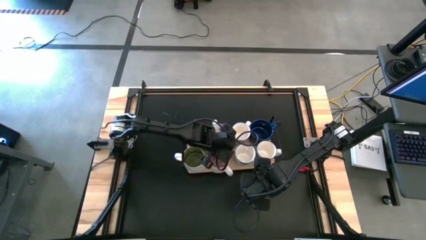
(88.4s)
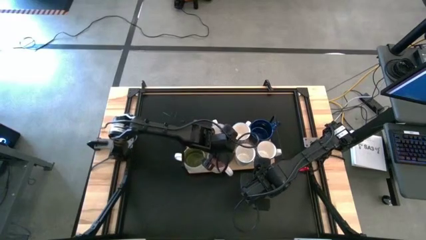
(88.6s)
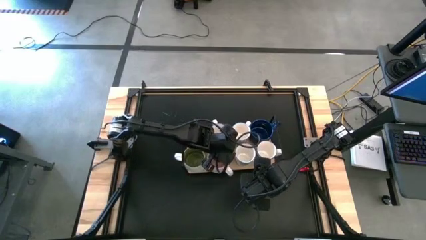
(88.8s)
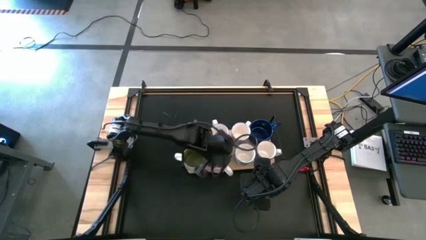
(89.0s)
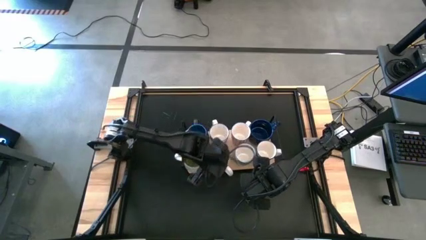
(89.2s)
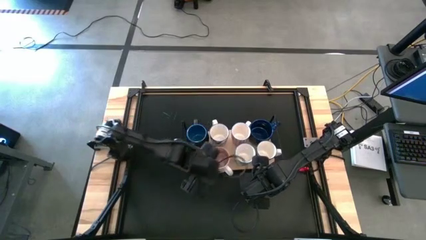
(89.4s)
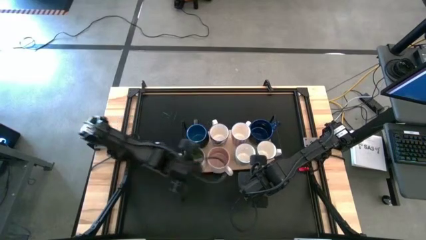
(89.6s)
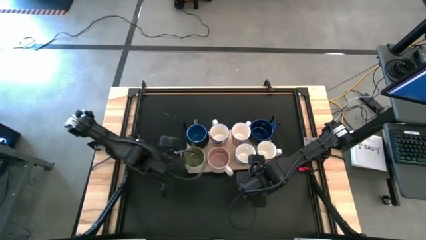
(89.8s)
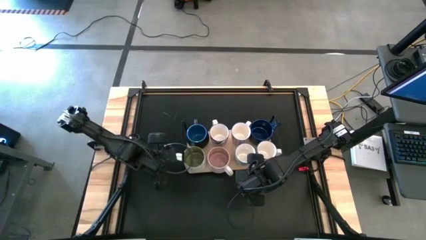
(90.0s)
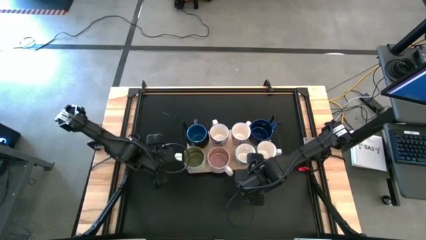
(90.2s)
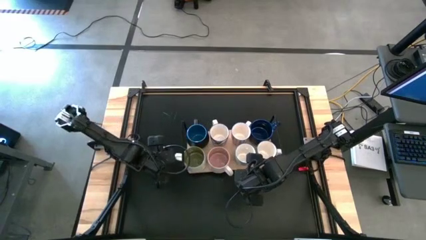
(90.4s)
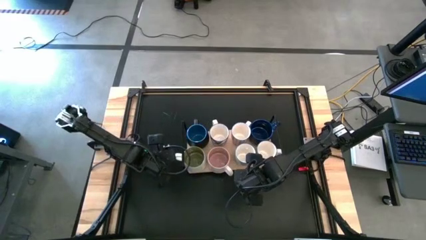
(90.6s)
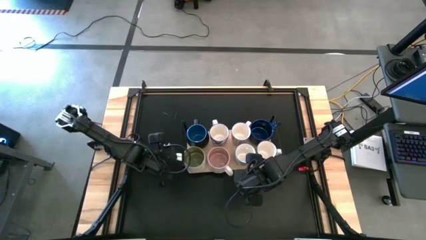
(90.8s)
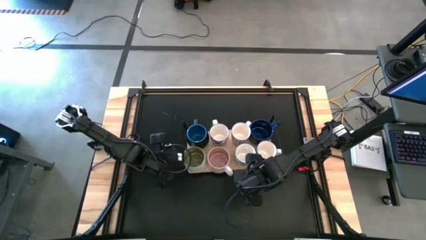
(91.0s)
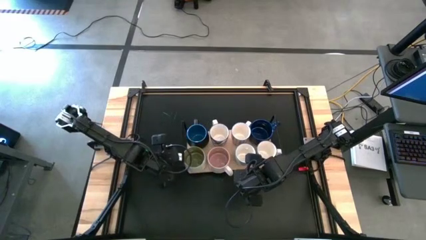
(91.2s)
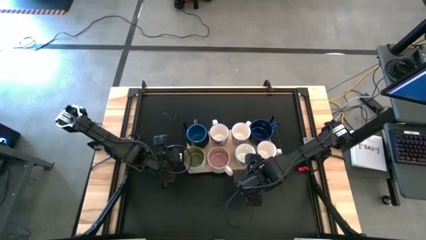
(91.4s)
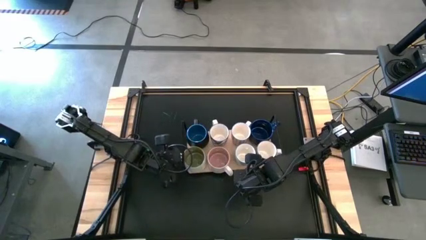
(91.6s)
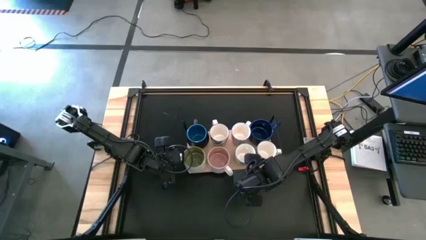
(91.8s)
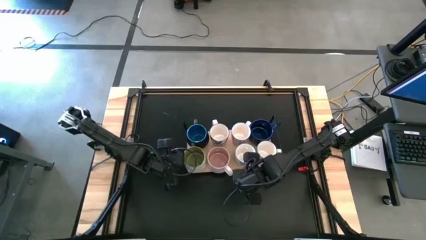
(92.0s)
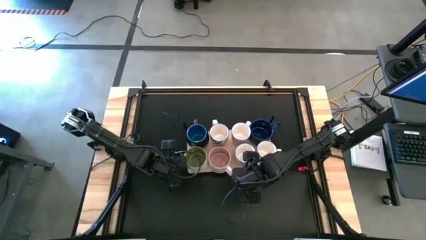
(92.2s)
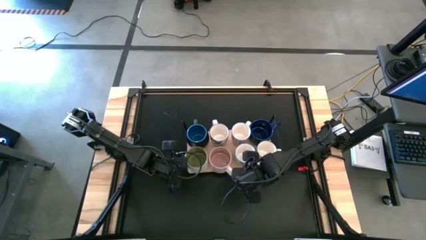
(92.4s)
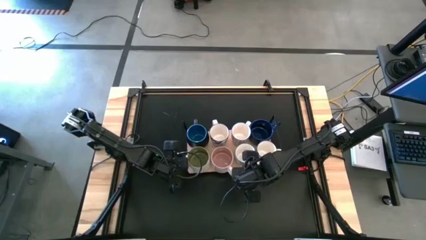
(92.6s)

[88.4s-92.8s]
Task: Place coffee mugs
Adjust the green mug on the shelf

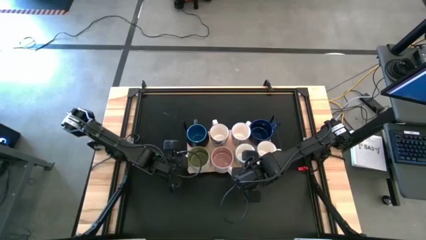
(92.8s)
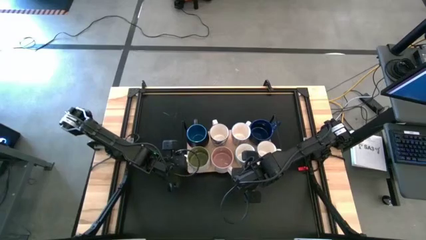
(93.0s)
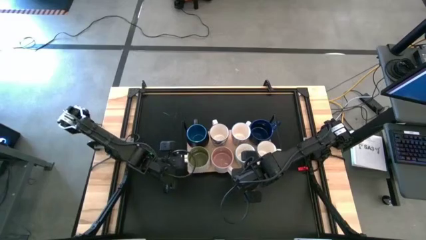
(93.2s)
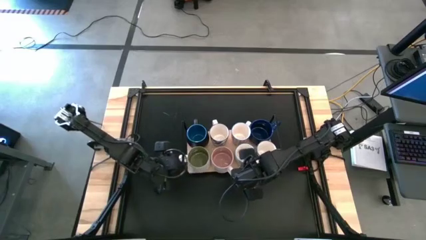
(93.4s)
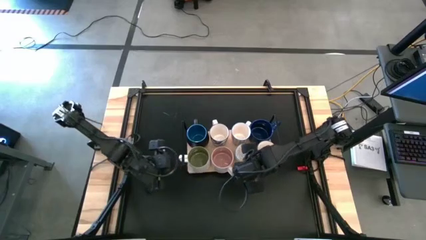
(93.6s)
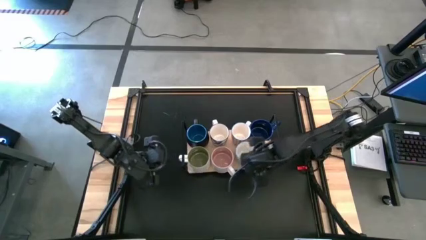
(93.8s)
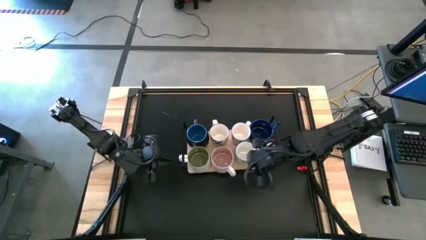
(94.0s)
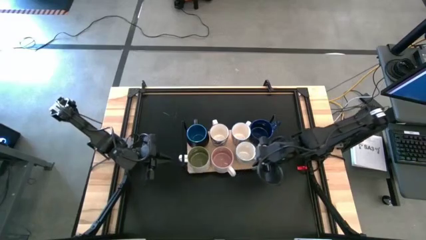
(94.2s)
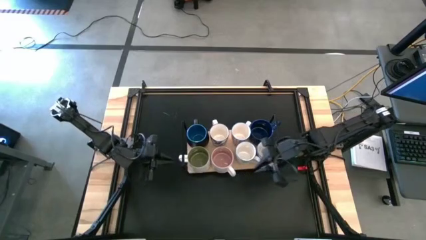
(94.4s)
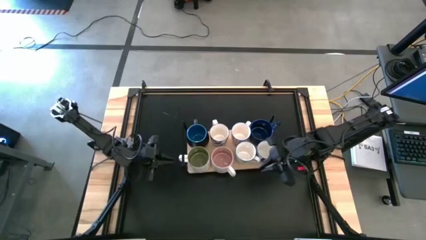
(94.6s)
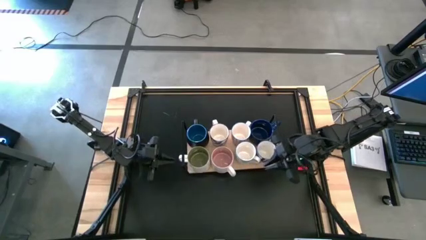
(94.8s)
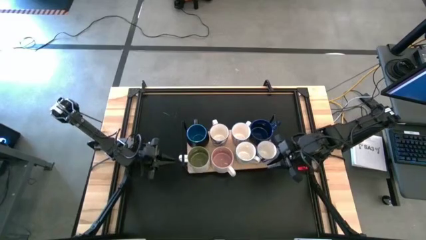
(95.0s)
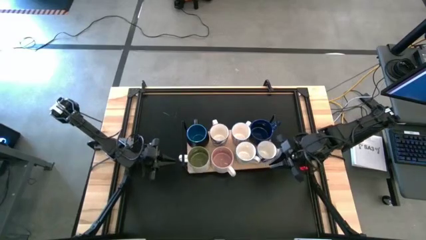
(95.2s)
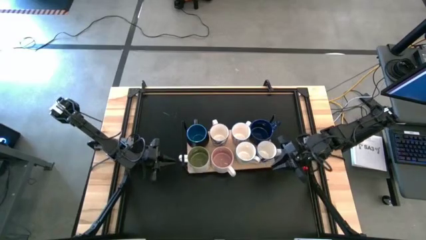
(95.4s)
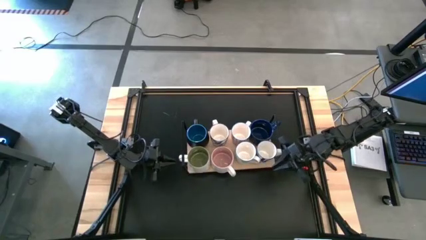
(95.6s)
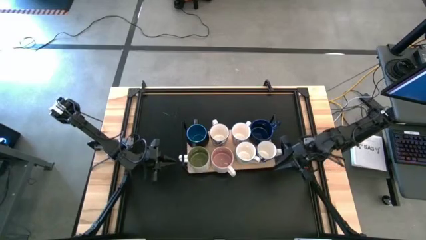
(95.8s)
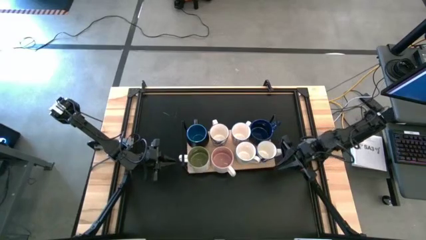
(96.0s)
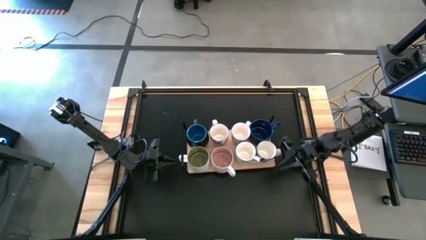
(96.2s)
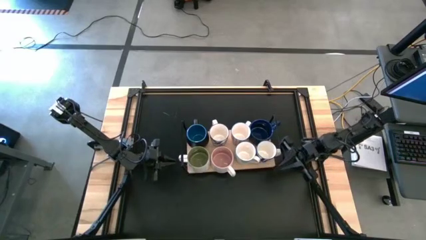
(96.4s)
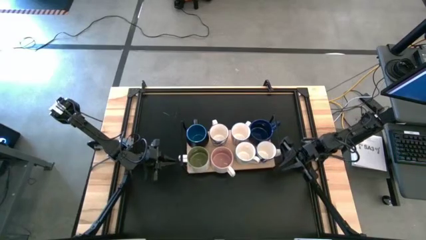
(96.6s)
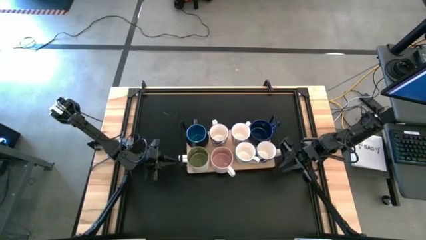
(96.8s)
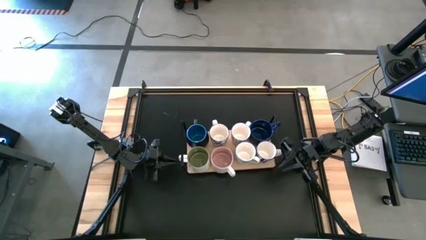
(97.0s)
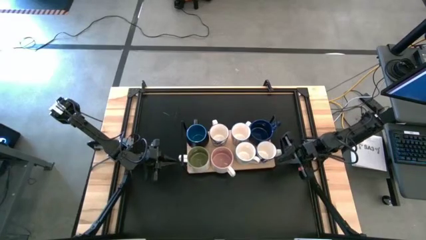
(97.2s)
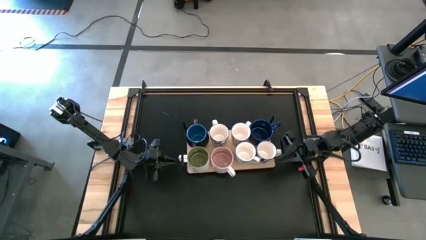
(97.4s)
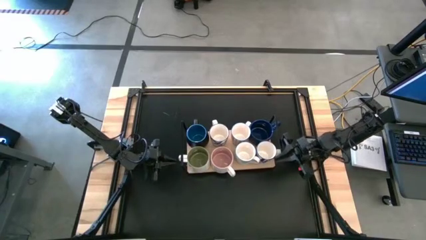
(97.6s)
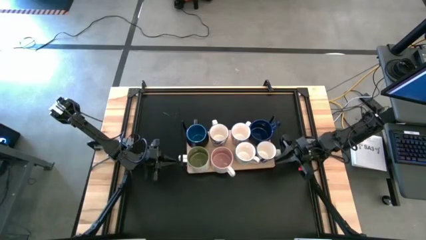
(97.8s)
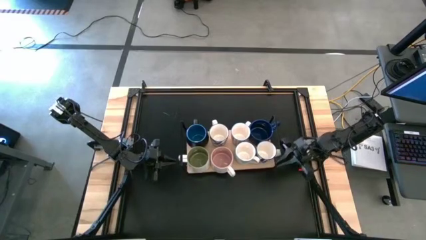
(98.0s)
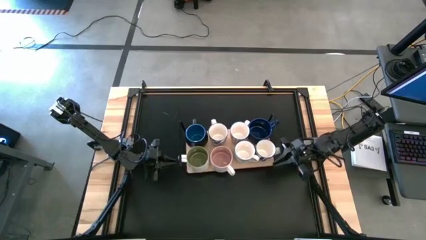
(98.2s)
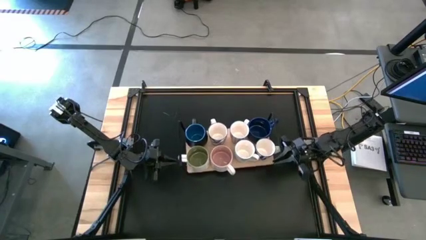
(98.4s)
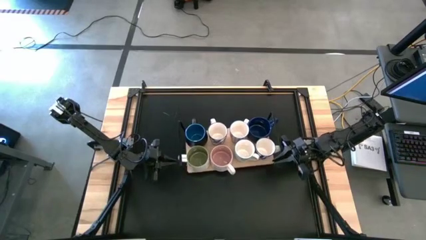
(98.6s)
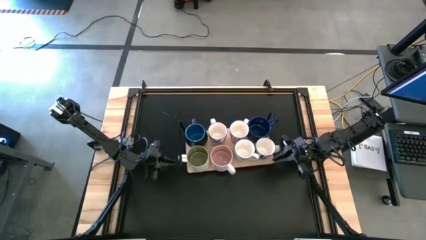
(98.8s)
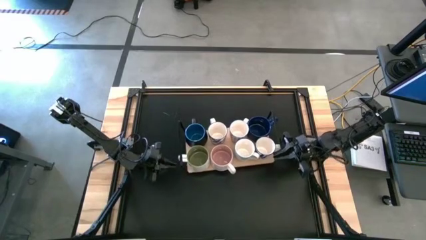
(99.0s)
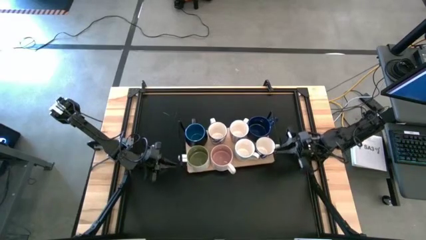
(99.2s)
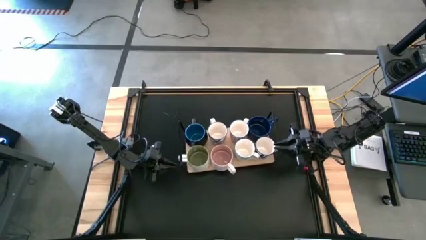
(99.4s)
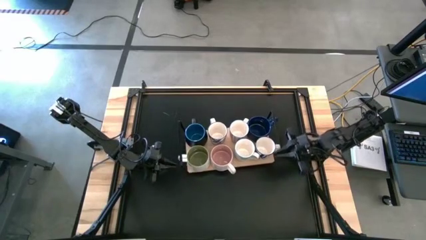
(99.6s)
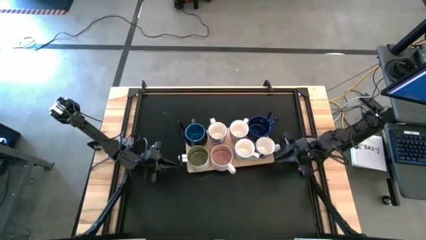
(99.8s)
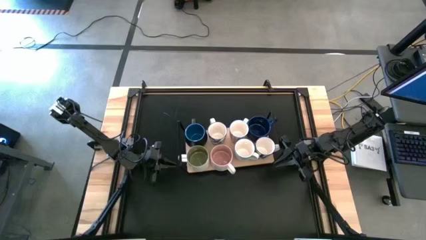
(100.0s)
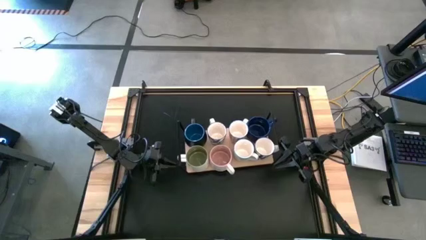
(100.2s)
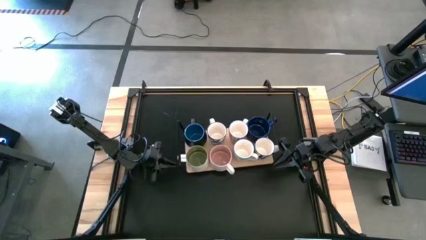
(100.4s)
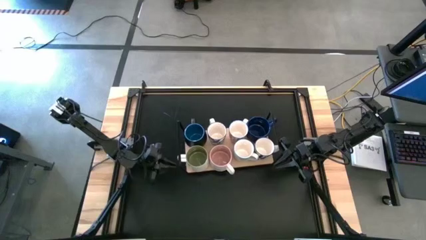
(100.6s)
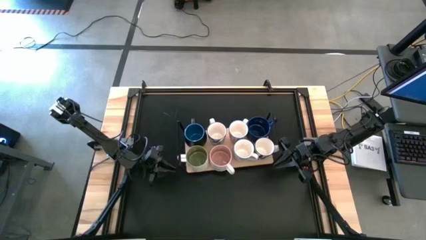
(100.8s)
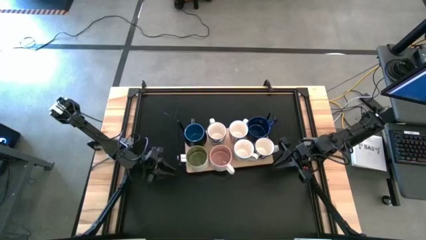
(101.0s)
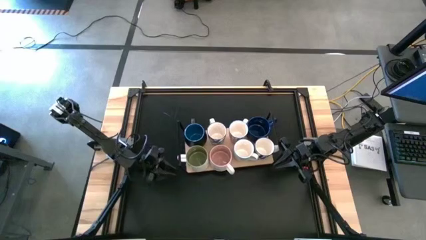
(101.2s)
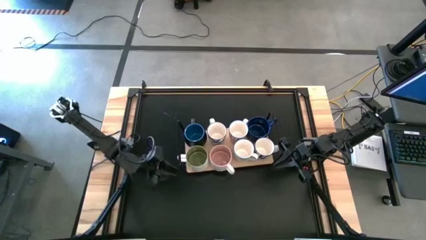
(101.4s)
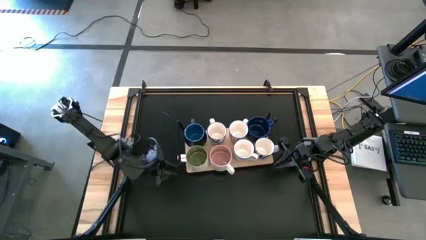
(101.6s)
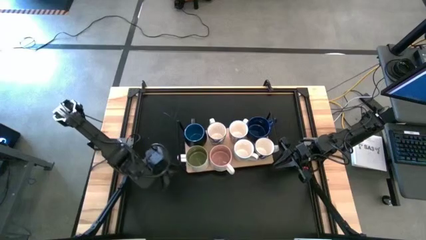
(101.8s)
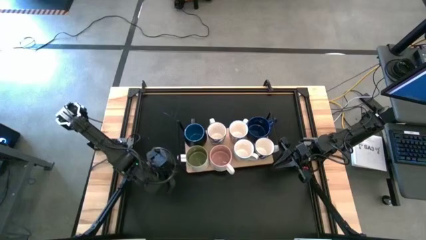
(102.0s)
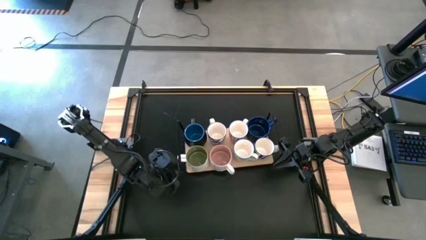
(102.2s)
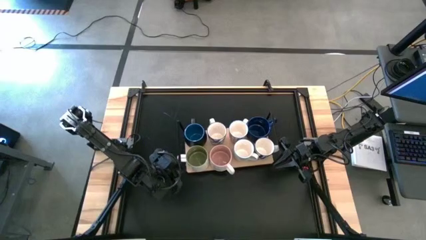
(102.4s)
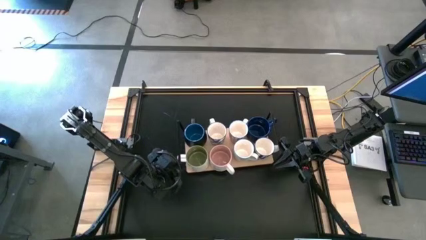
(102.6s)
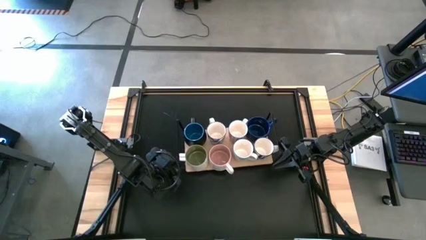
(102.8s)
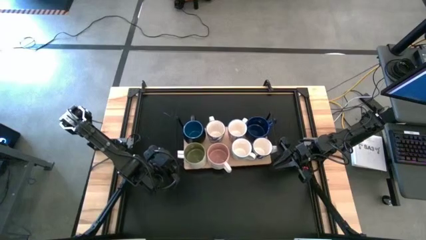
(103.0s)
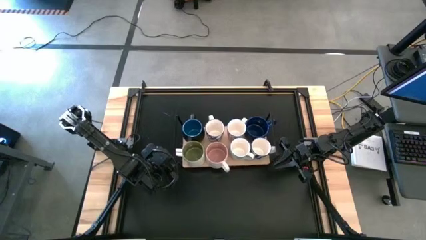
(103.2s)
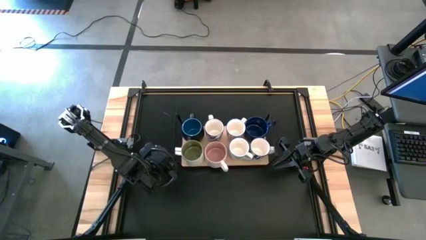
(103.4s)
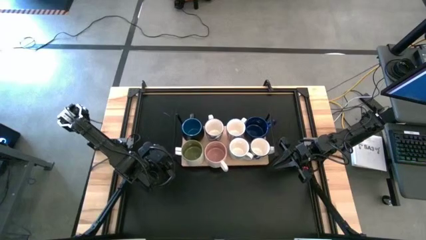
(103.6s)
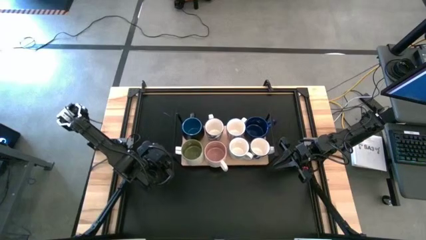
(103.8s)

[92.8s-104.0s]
Adjust the shelf on the table
